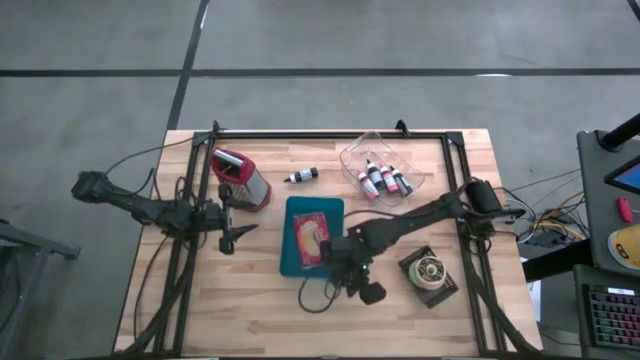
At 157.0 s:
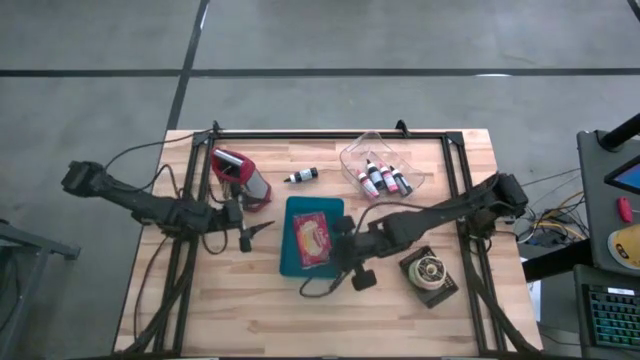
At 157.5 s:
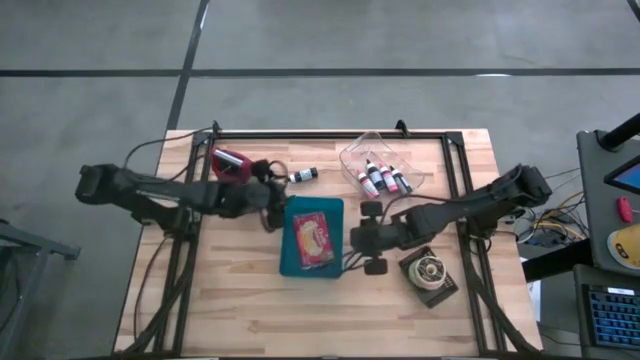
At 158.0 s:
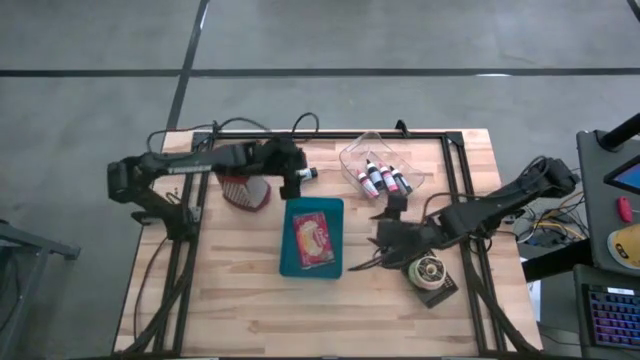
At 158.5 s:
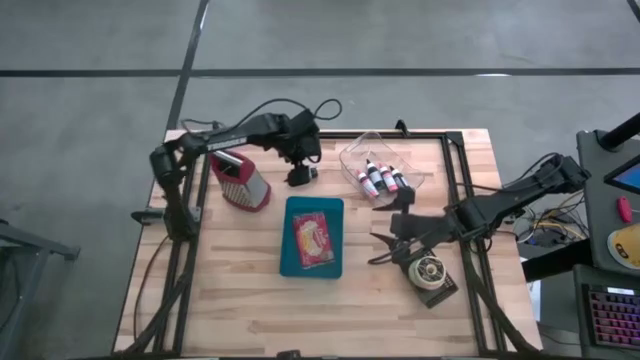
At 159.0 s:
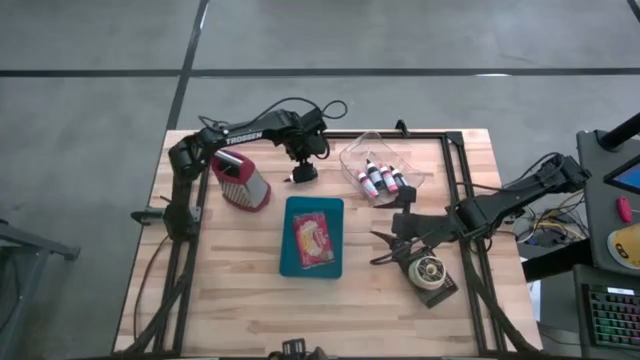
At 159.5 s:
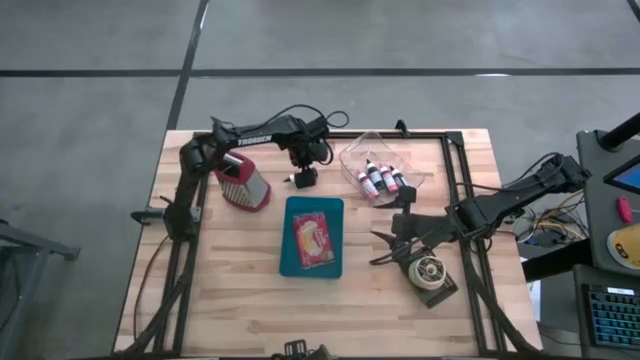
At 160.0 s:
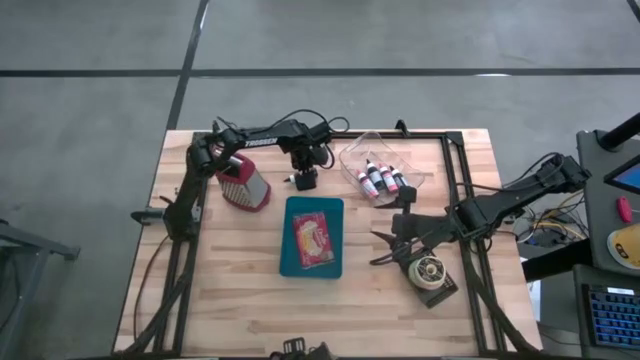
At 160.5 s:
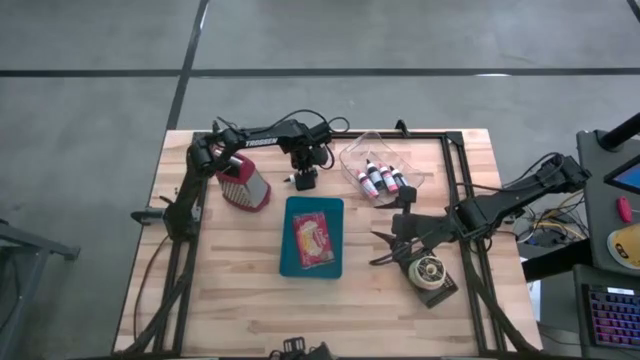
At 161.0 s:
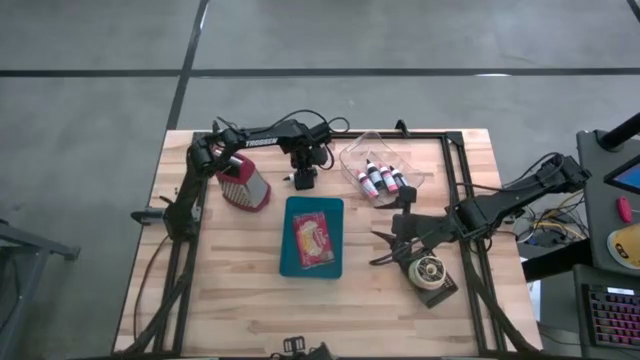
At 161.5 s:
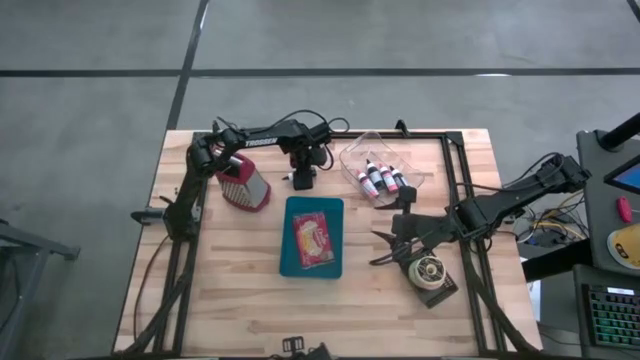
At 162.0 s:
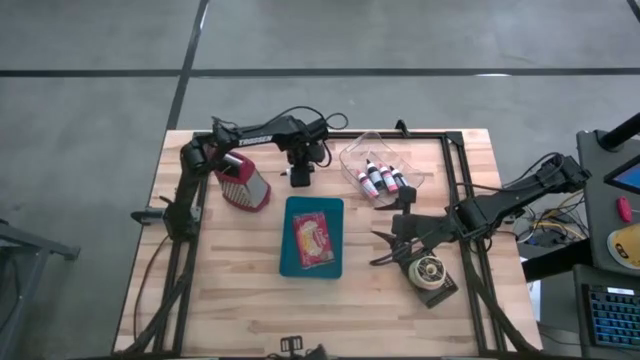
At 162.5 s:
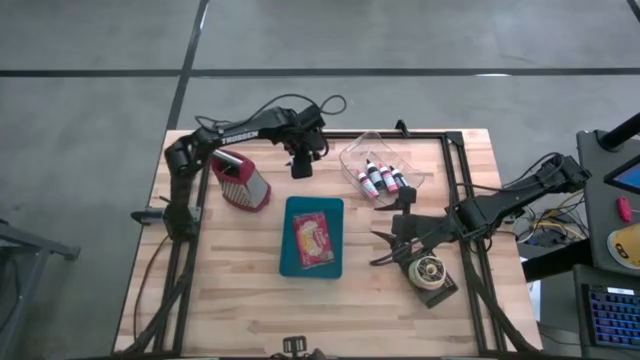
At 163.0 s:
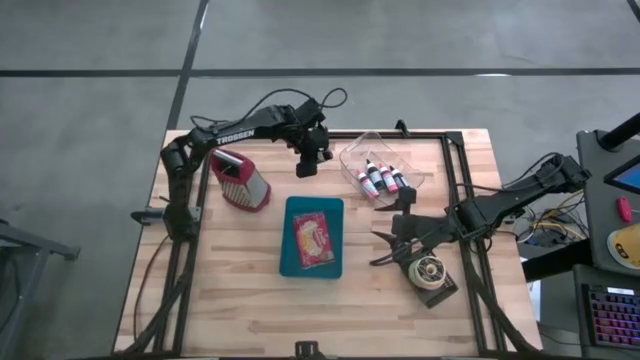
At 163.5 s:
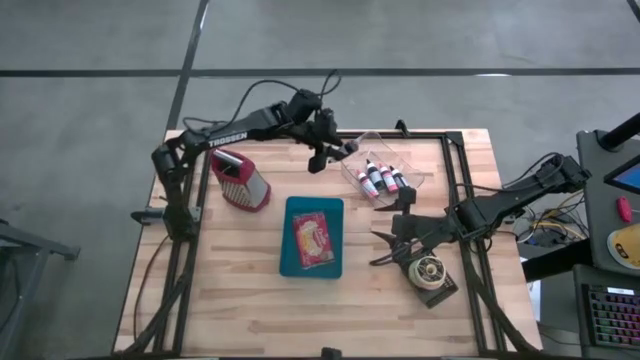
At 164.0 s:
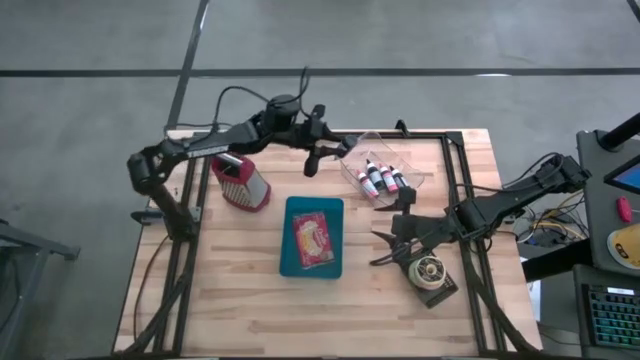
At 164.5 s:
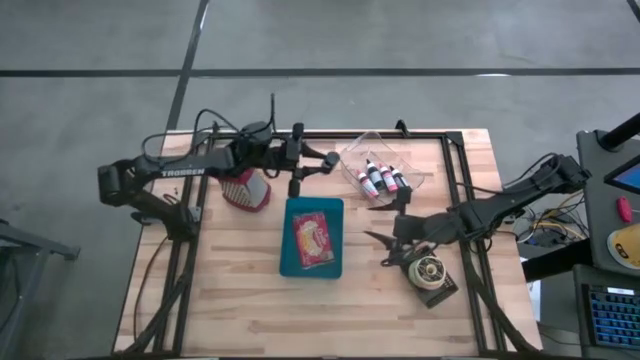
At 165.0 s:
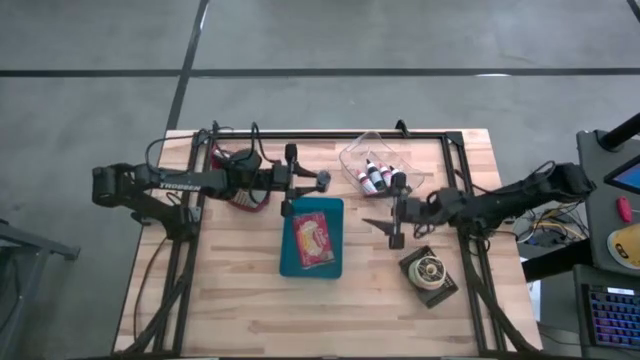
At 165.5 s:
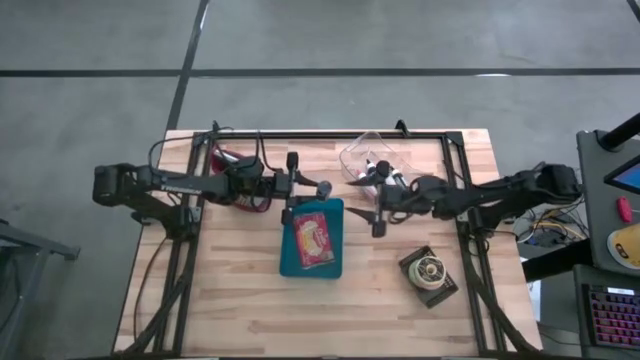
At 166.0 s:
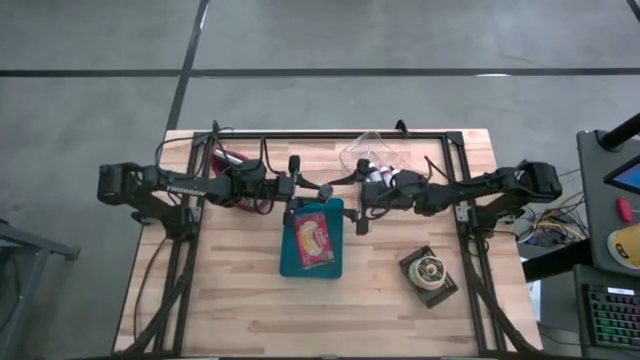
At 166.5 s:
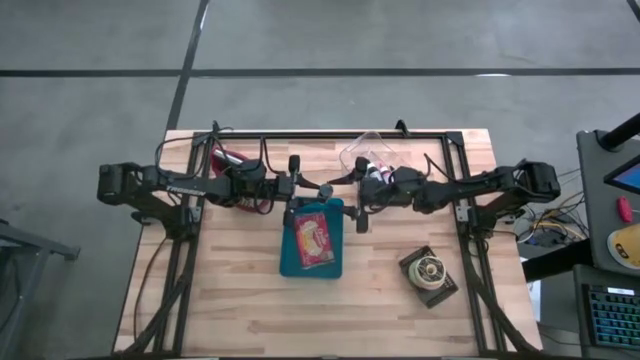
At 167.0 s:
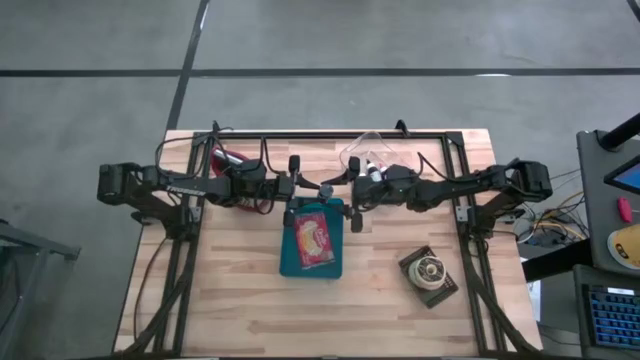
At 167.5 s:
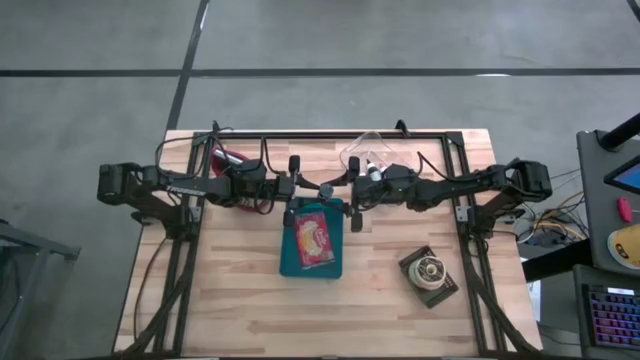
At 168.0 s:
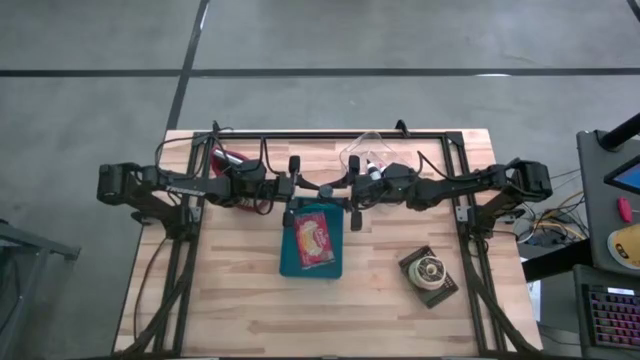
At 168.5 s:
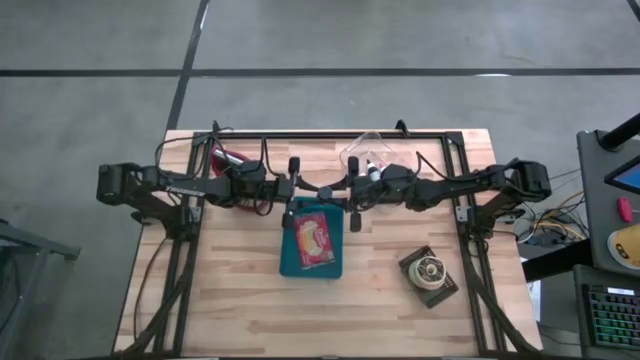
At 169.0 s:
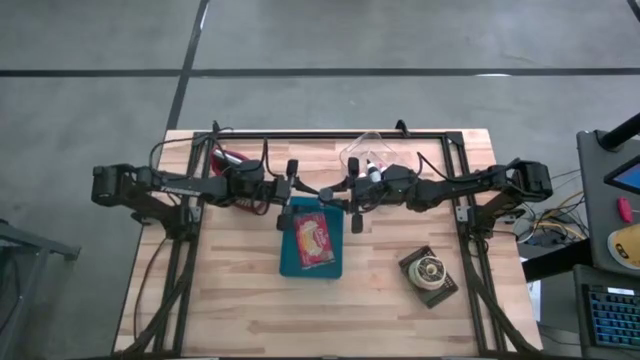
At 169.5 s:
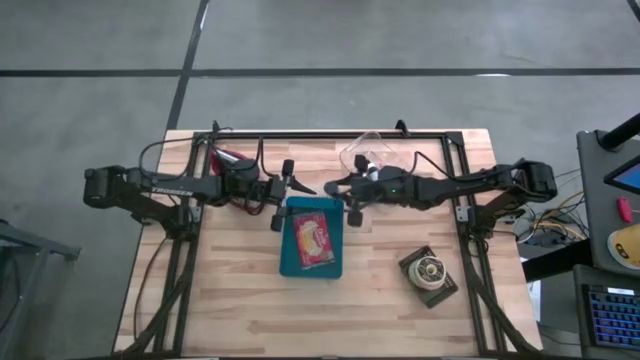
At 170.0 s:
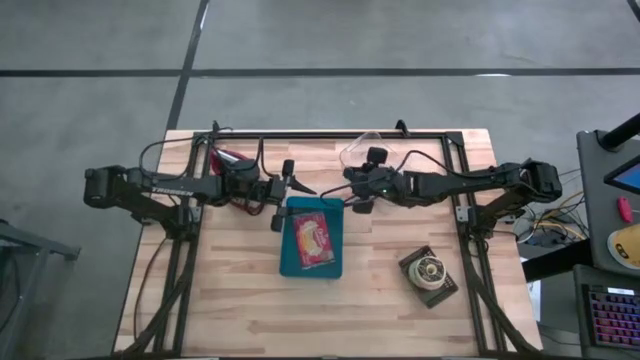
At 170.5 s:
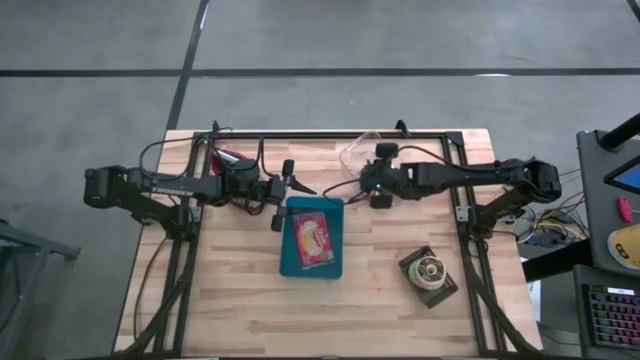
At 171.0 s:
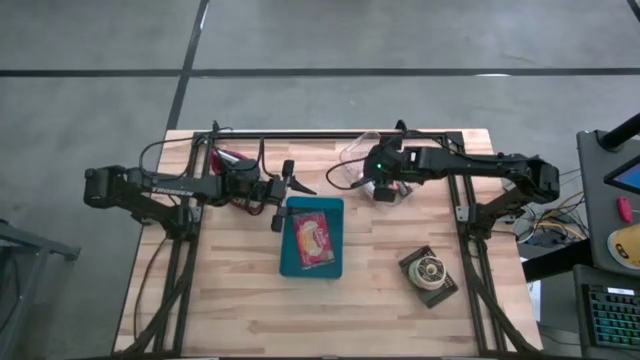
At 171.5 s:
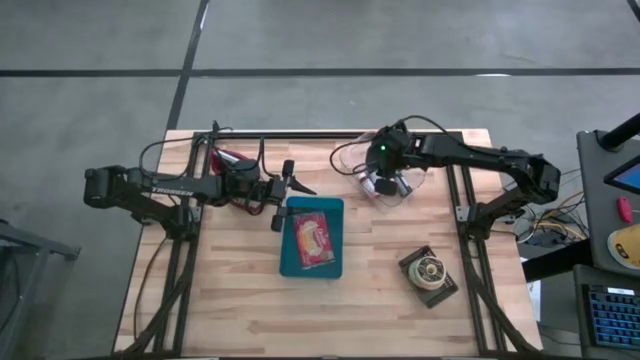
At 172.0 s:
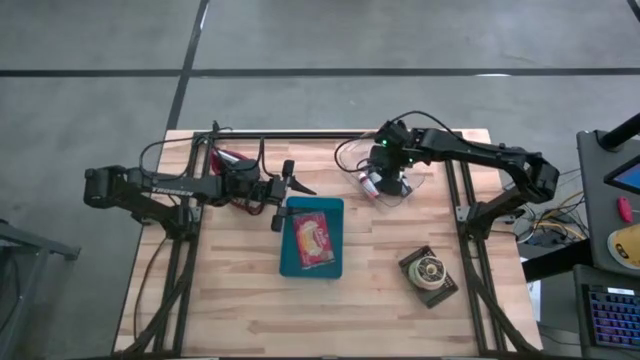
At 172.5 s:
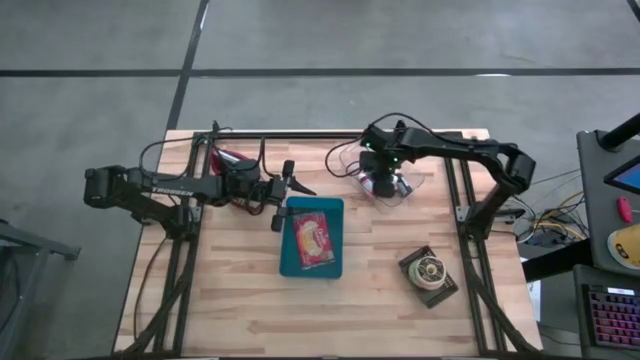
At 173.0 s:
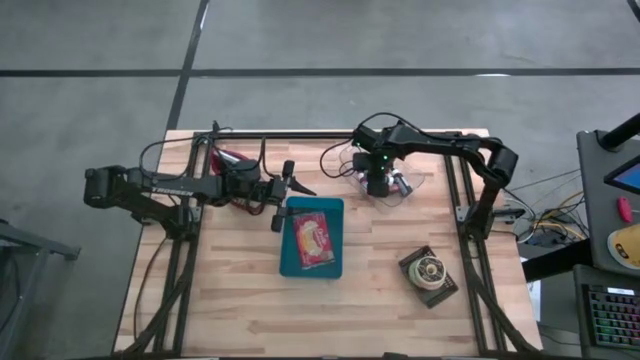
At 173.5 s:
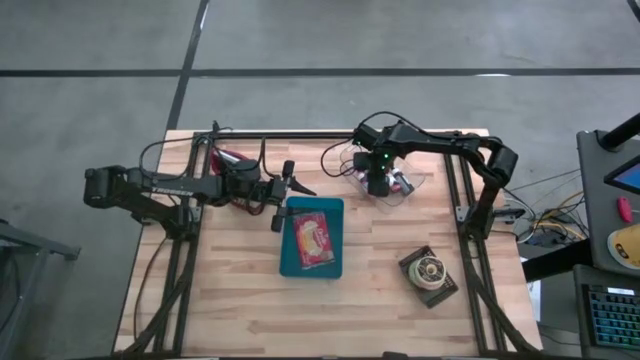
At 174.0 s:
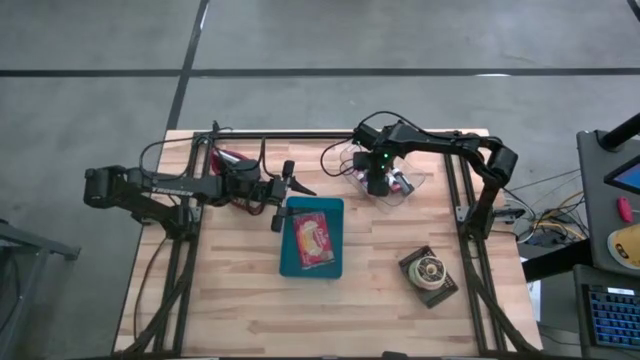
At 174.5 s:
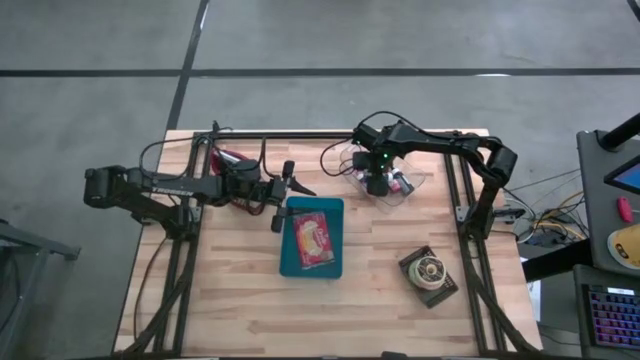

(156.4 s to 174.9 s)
Task: Pick & Place Food Item
Put the black food coloring bottle into the transparent bin

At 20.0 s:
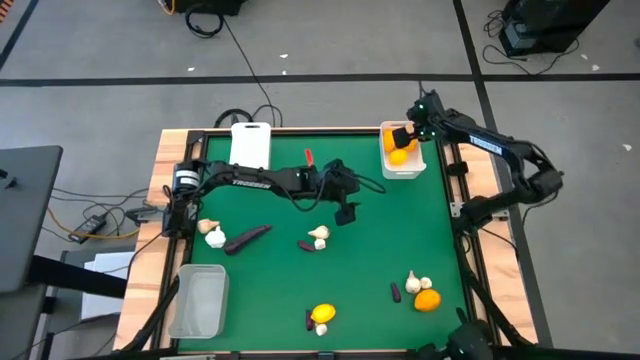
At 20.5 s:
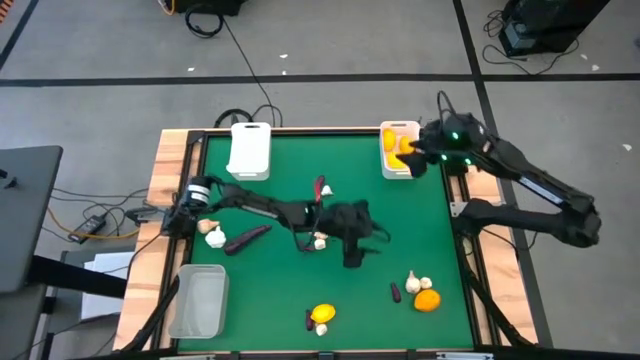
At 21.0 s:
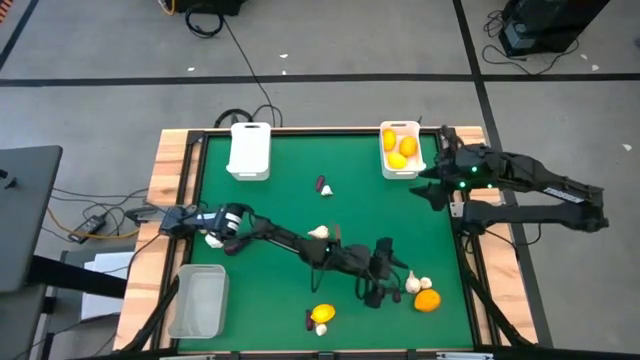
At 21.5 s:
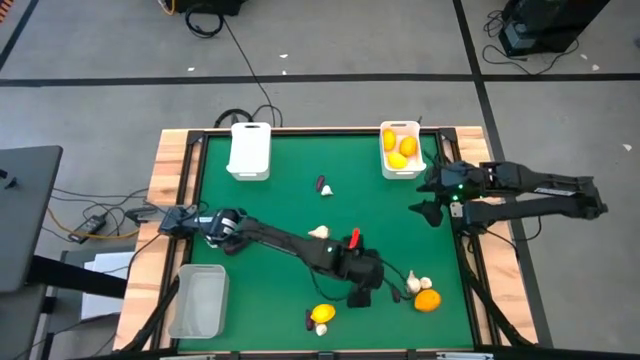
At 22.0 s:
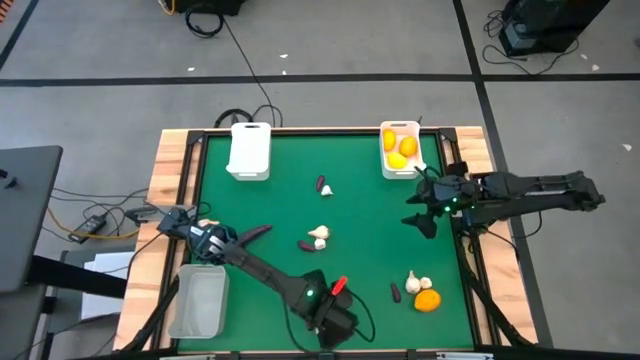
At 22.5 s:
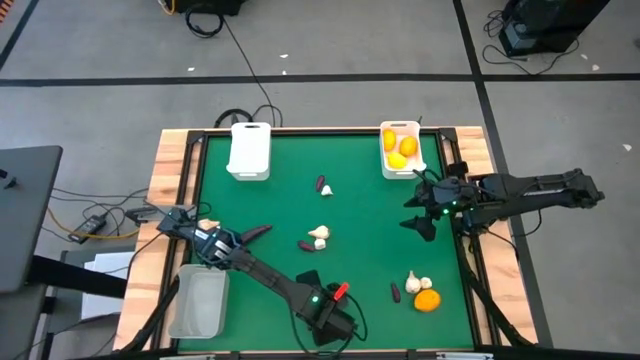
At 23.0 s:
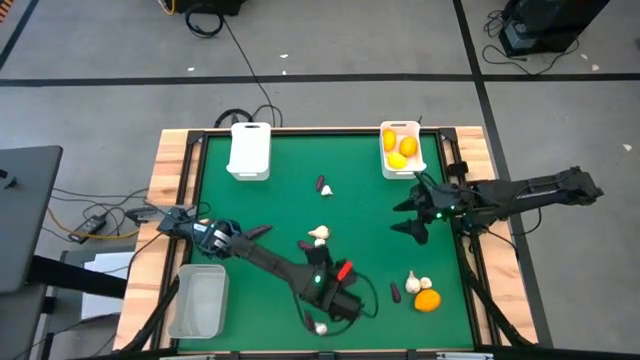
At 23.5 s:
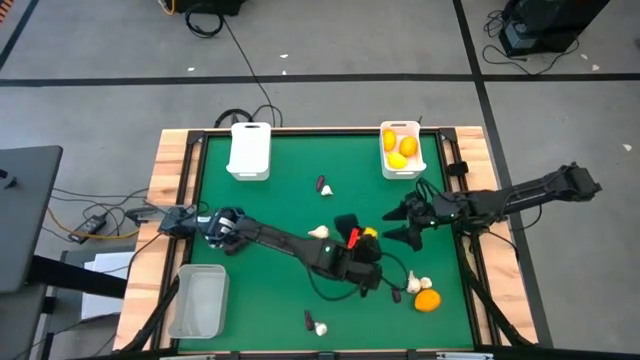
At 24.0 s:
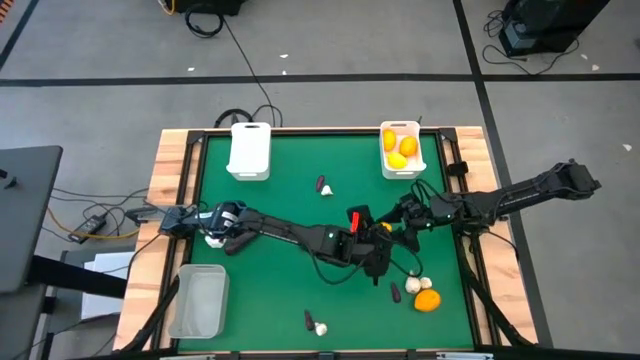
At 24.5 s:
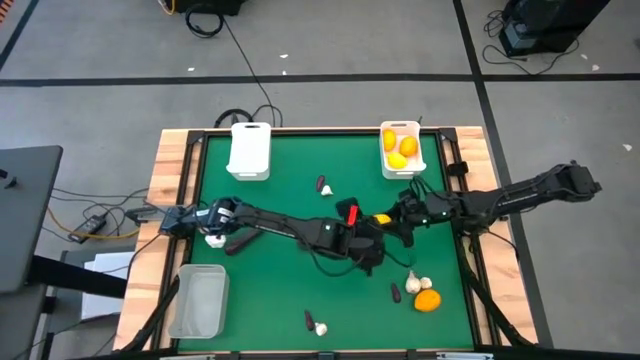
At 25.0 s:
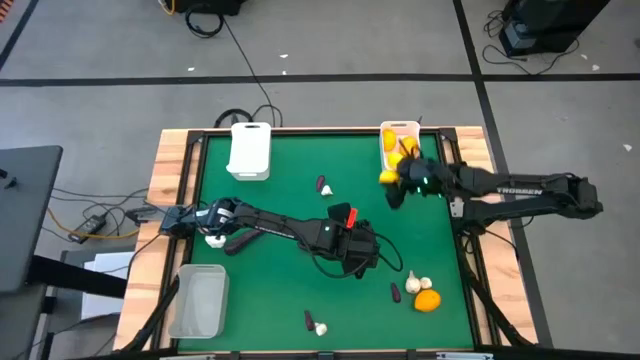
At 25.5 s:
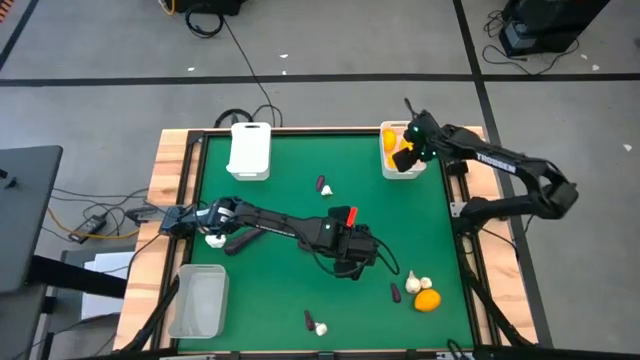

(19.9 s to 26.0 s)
Task: Sort produce into baskets
Put the left lemon into the right white bin
